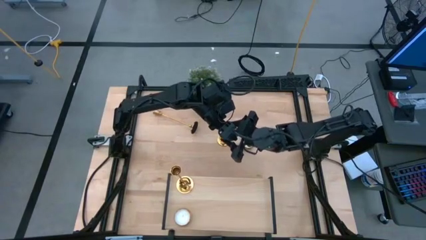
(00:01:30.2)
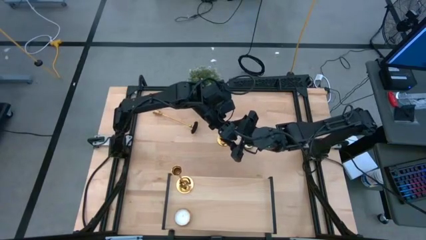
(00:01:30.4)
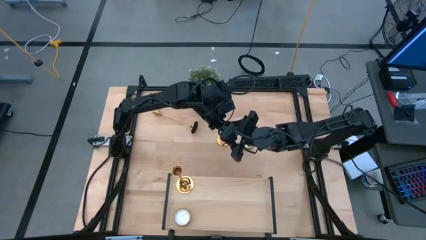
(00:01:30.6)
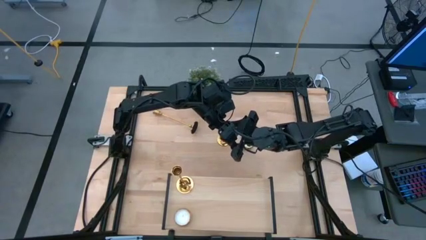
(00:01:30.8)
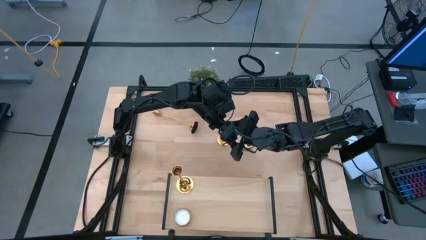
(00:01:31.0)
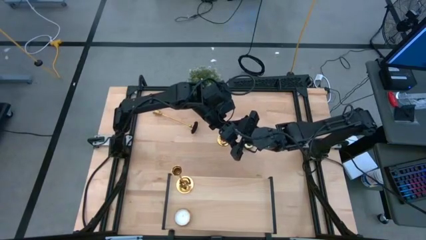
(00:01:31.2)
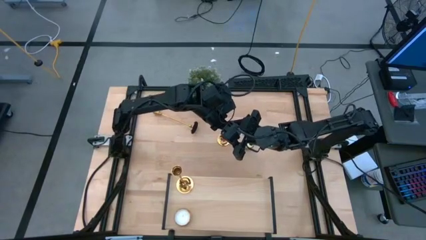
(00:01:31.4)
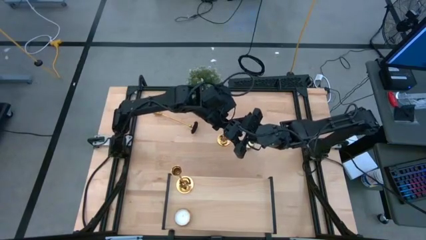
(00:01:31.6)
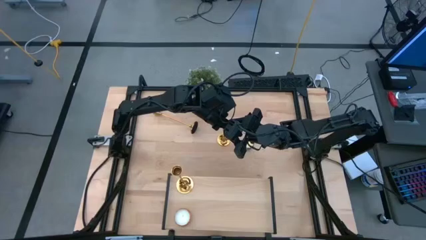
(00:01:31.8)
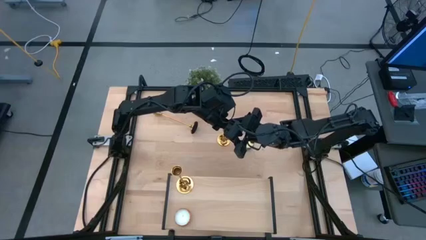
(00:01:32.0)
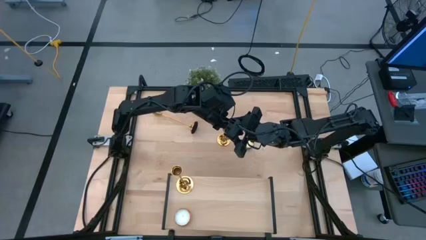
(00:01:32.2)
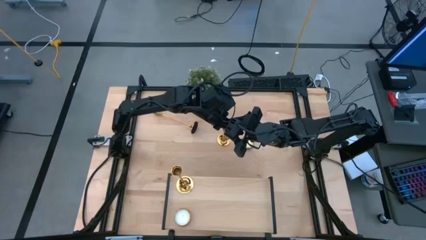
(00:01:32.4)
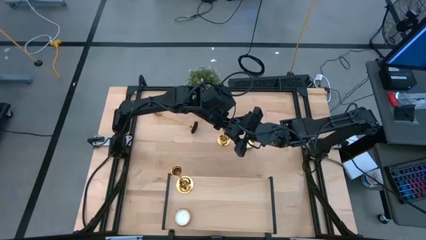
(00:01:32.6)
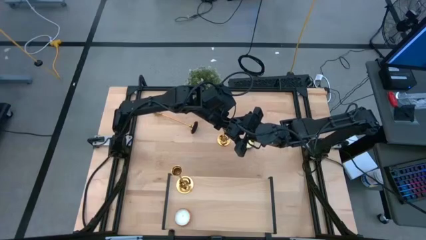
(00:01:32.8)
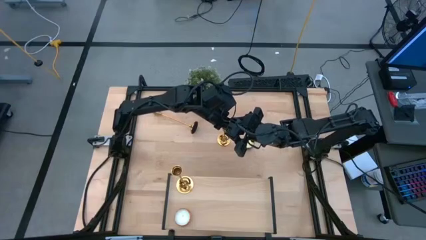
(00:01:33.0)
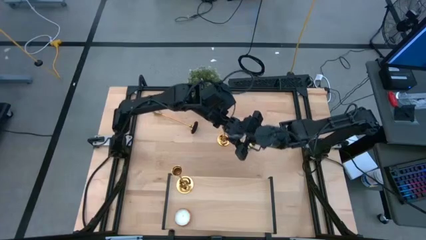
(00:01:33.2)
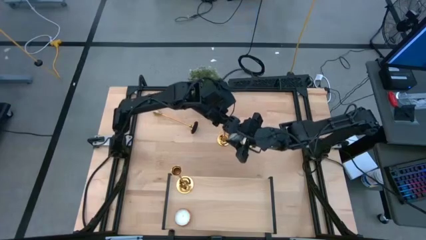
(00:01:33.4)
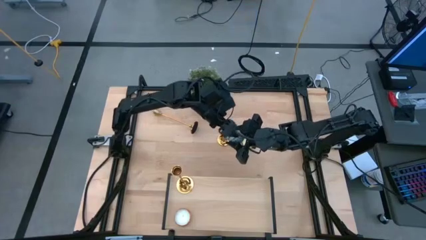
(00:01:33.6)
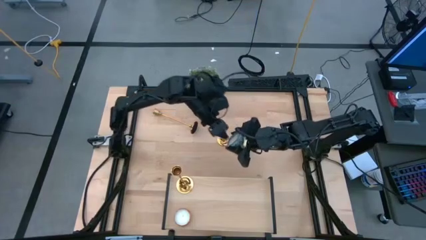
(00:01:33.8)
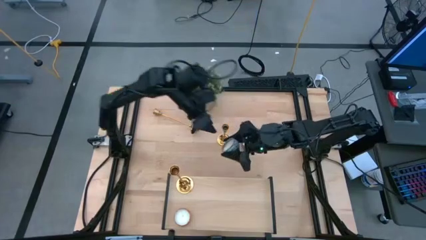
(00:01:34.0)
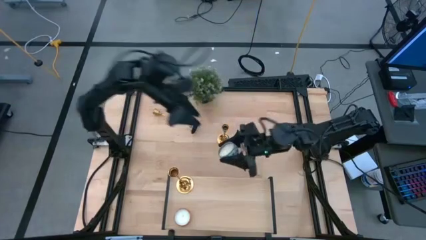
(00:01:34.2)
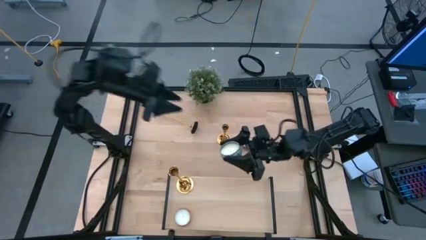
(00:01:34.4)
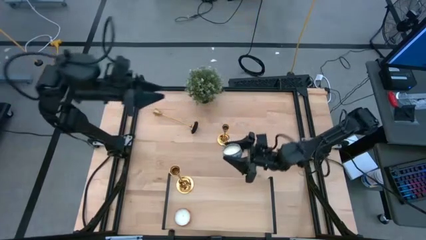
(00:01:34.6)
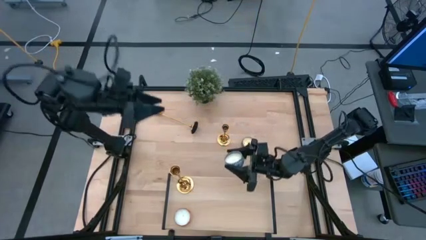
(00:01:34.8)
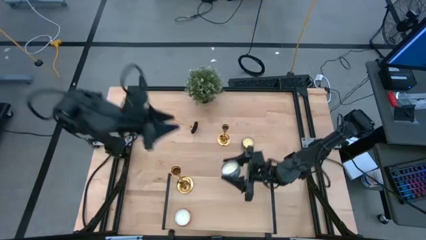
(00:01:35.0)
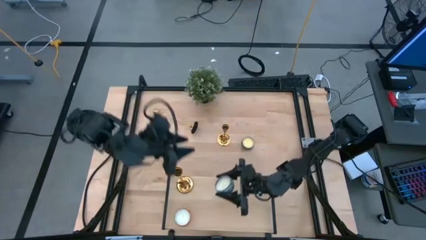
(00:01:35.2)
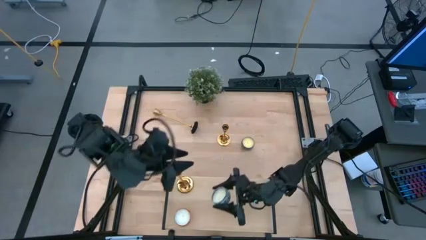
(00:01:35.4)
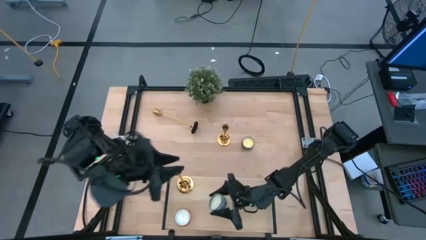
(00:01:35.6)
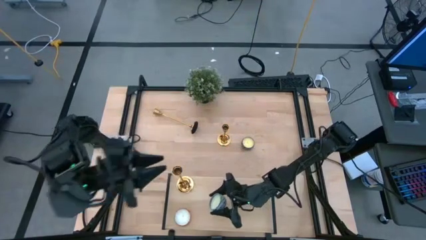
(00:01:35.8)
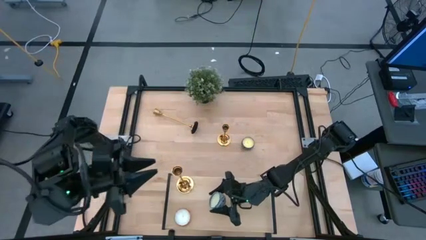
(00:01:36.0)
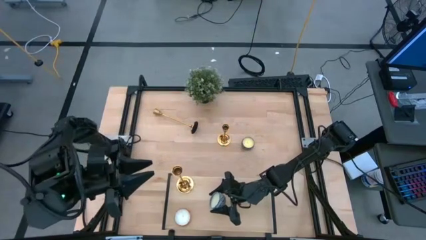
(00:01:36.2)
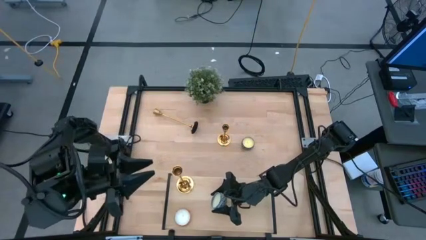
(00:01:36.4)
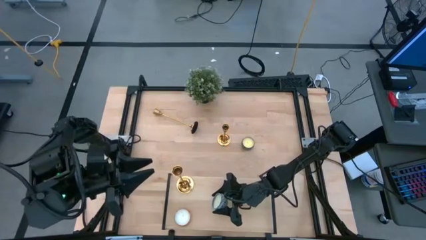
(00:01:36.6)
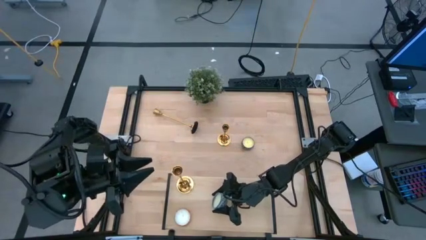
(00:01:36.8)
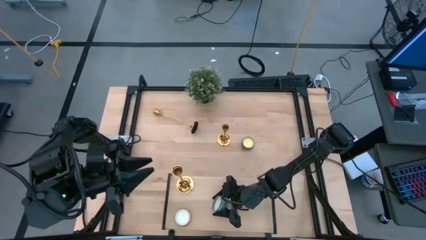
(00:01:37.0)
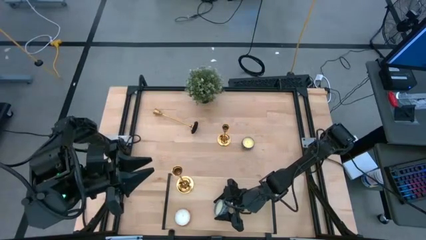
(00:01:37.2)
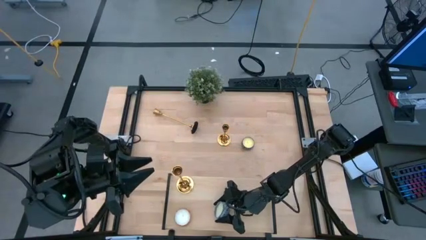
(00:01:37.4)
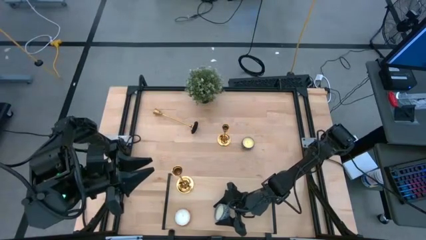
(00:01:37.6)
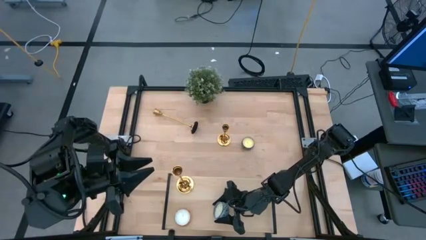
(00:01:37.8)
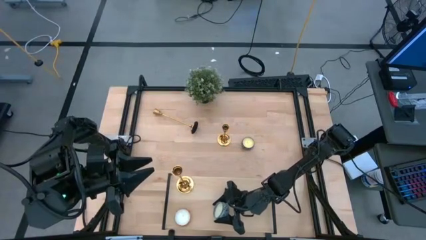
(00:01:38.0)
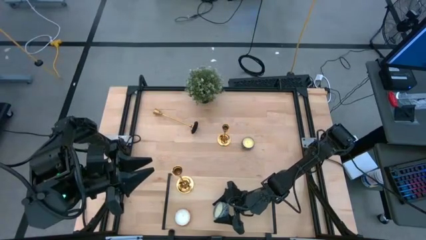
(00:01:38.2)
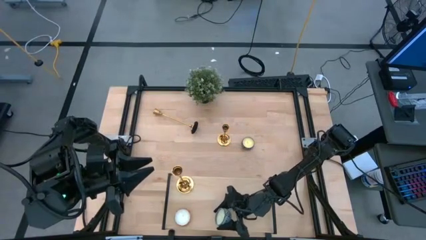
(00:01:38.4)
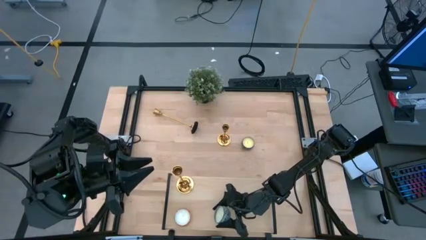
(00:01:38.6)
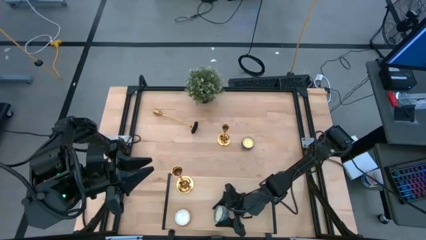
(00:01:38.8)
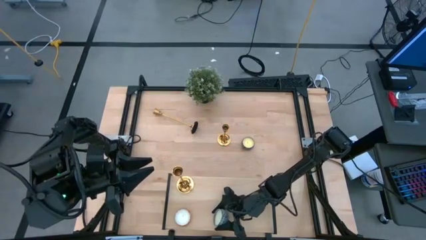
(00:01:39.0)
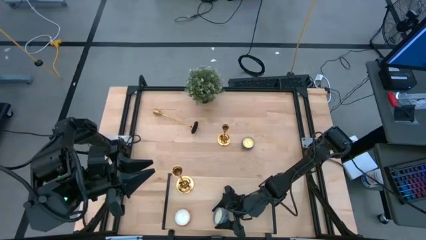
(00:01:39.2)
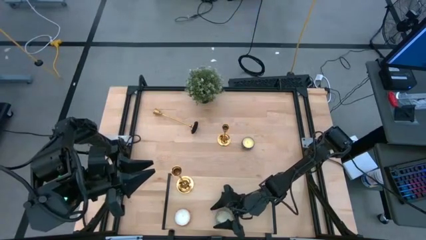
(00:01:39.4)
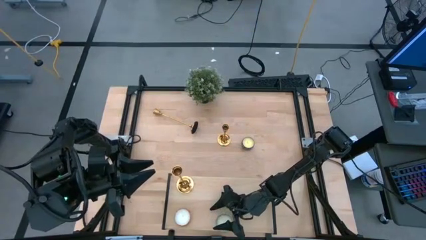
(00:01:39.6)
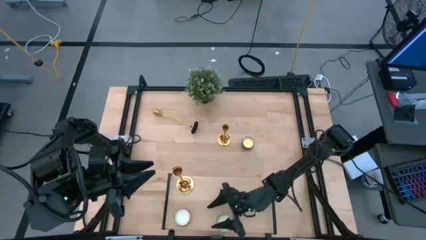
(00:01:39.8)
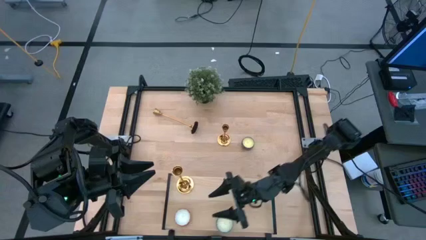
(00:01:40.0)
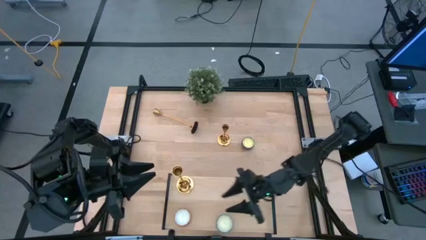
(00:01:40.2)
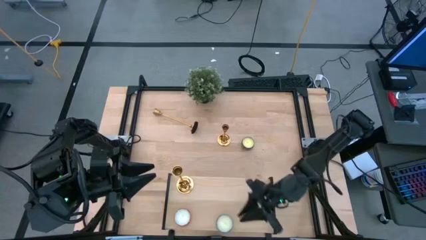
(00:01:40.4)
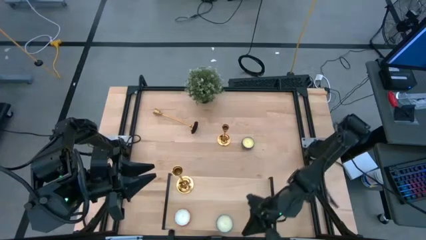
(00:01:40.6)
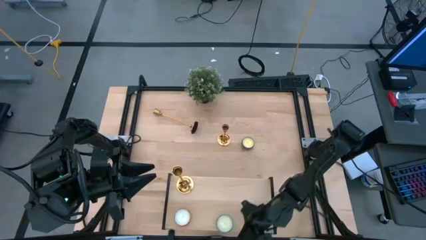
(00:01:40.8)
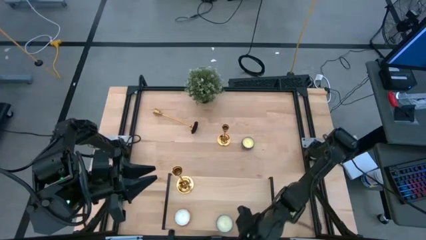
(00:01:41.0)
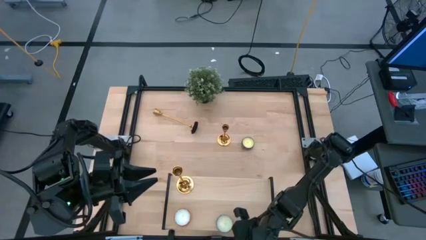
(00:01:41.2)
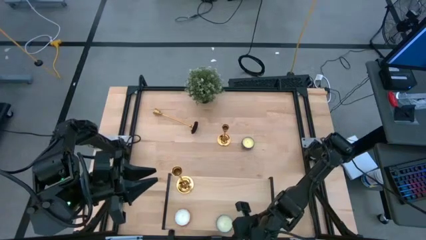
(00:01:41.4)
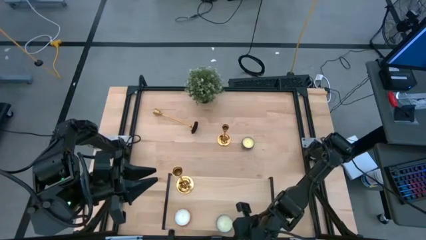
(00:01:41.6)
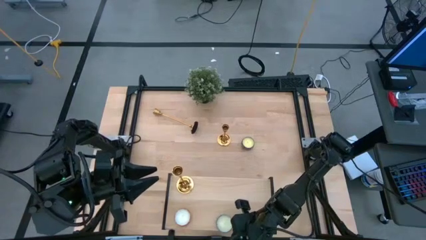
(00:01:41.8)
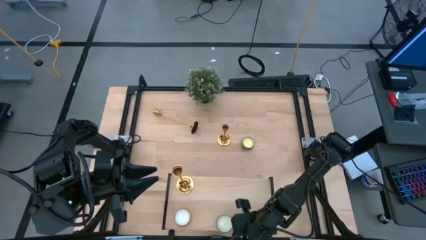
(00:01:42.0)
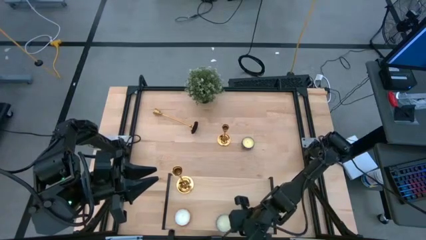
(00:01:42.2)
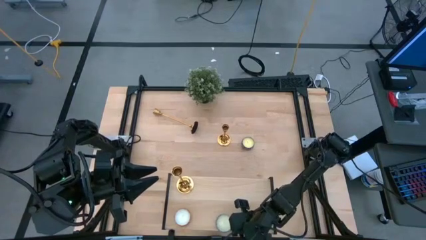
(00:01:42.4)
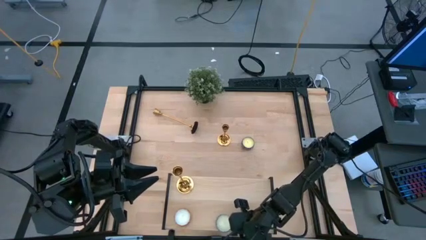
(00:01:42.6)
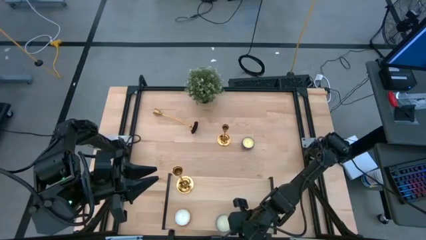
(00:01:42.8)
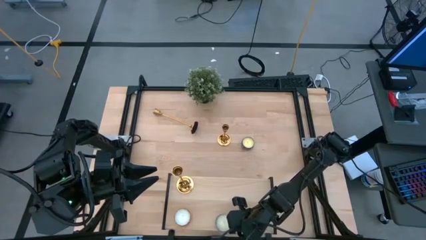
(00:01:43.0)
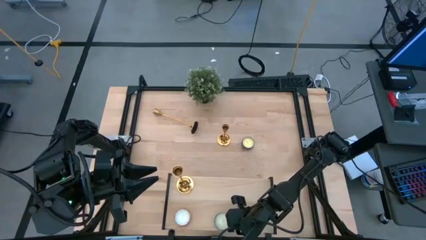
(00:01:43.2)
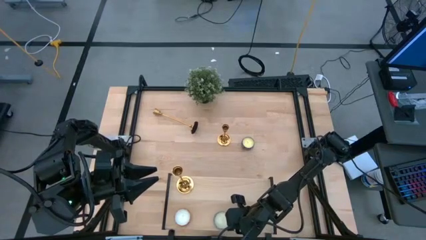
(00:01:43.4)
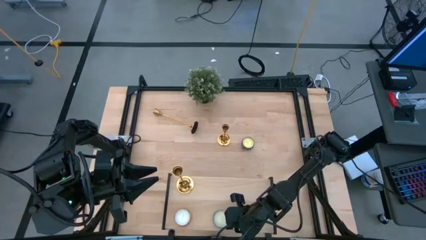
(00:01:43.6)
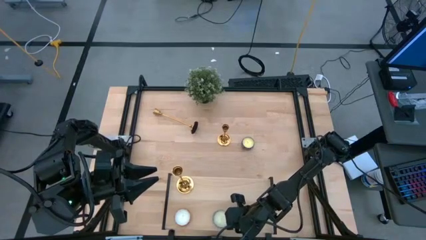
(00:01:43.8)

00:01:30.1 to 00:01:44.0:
Task: Pick & Place candle stick holders
Put the light blue scented candle on the shelf

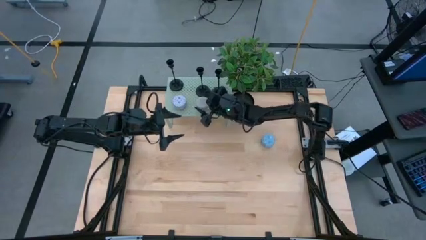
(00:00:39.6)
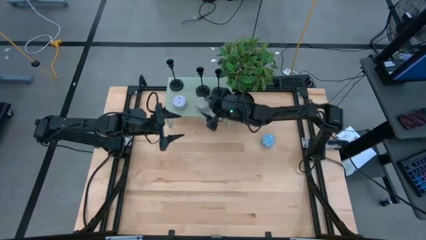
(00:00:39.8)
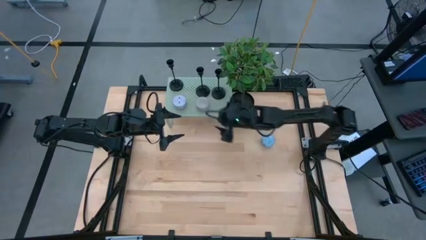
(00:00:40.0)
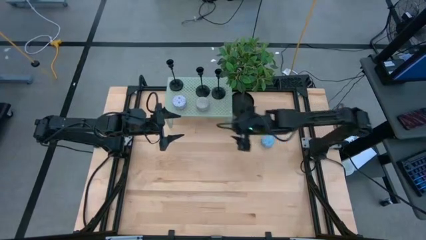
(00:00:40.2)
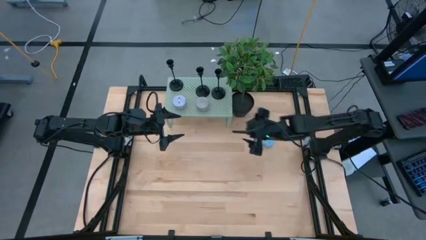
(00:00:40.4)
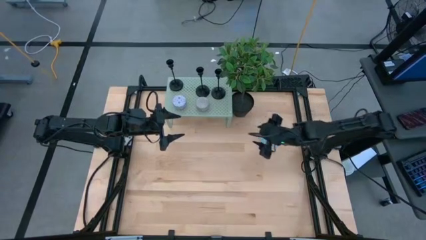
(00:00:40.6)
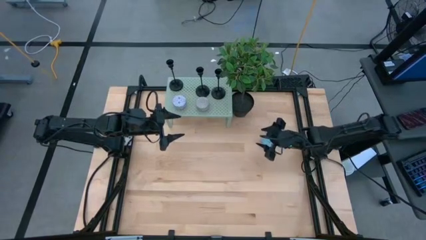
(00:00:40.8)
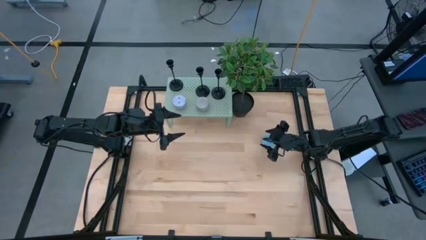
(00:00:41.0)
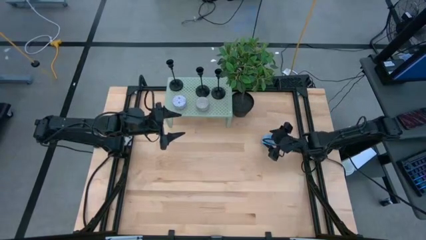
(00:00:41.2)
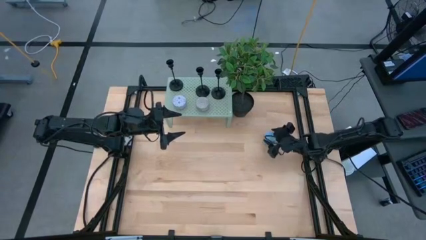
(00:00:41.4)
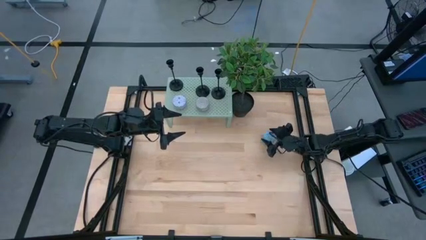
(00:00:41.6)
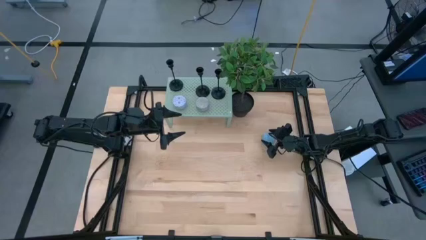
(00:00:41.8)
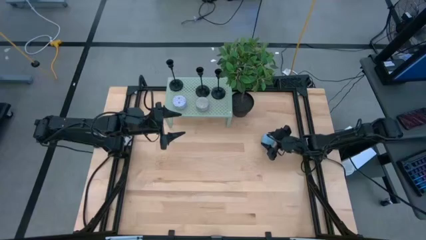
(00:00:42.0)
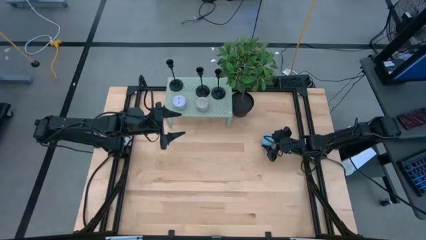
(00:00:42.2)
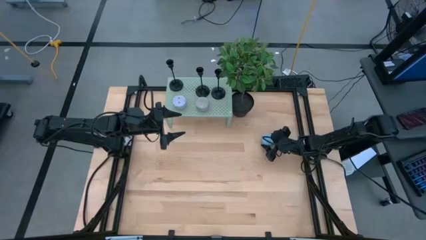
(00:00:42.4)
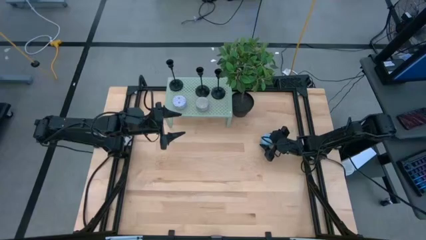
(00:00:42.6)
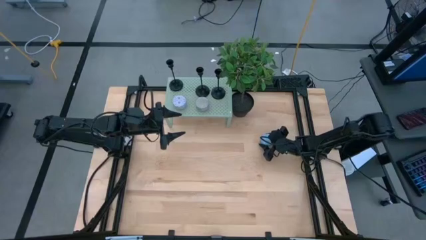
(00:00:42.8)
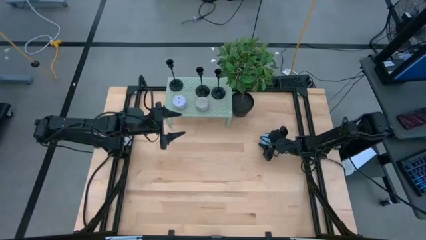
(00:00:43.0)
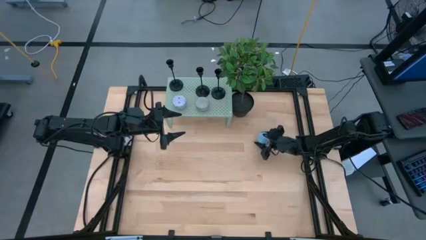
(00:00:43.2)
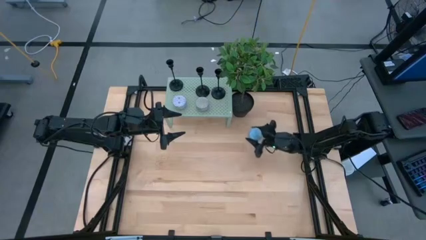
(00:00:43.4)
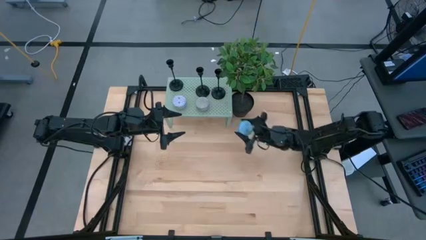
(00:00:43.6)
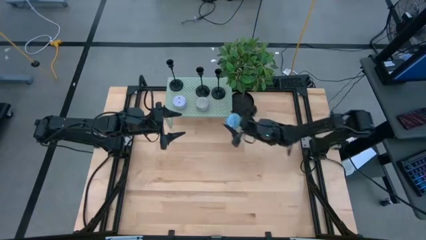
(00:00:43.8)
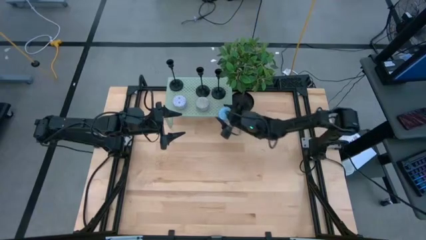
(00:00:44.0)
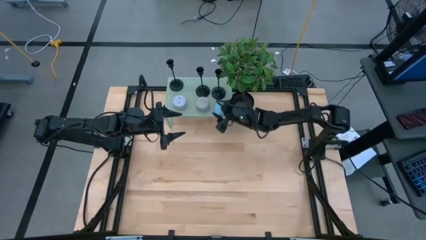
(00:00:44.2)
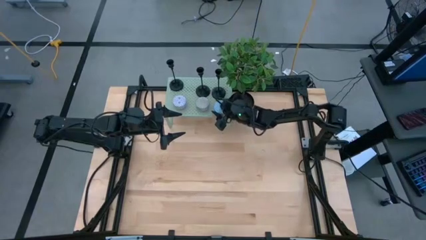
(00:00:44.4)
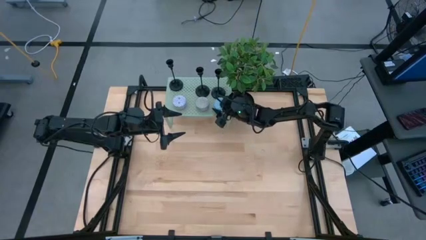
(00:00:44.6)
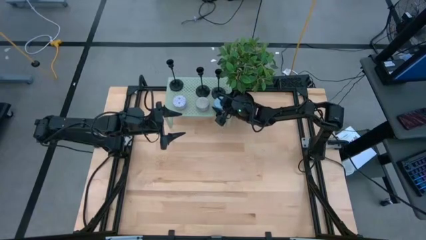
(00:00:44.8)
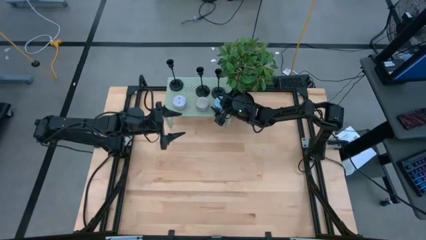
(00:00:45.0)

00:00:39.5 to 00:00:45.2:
Task: Pick & Place candle stick holders
Put the light blue scented candle on the shelf aligned with the blue and red scented candles
